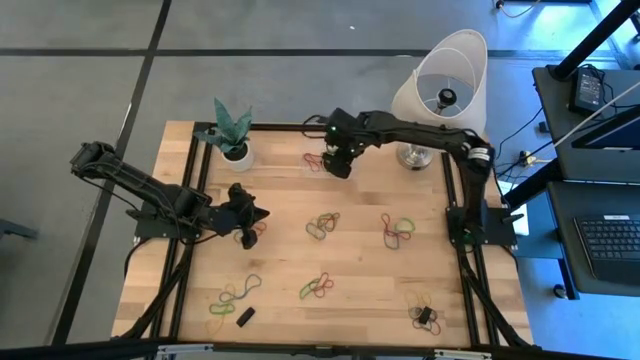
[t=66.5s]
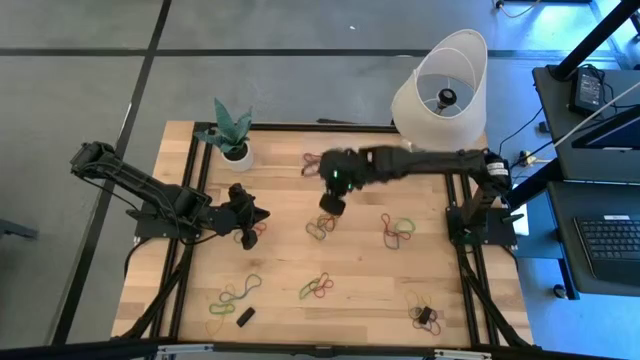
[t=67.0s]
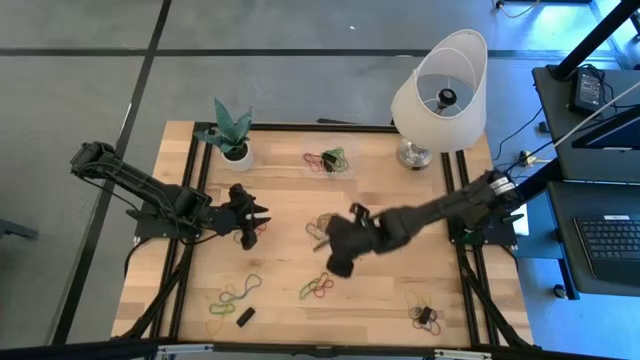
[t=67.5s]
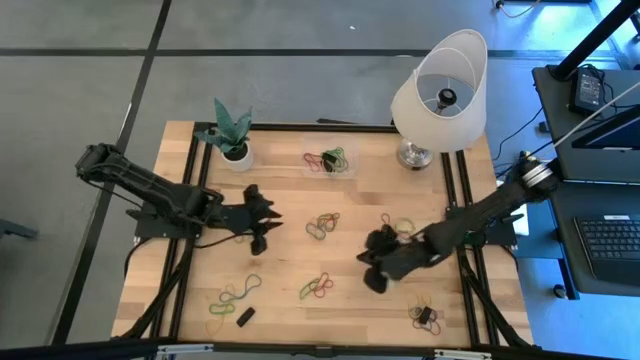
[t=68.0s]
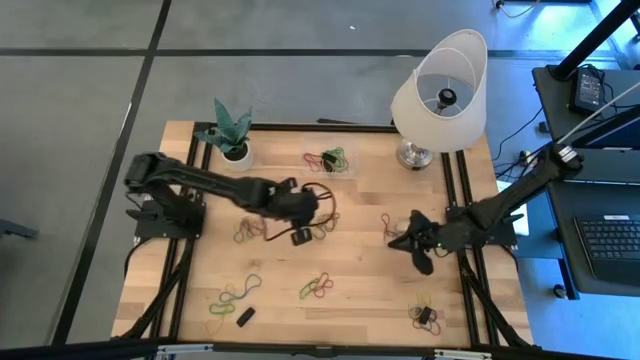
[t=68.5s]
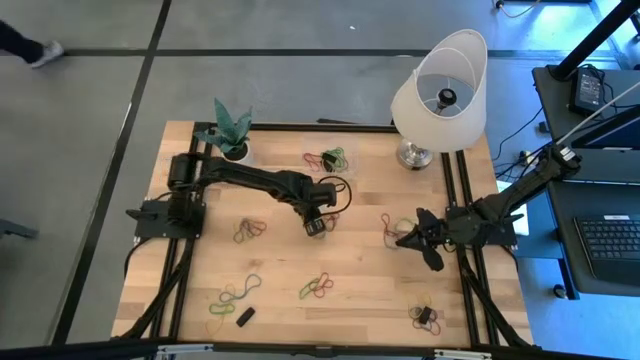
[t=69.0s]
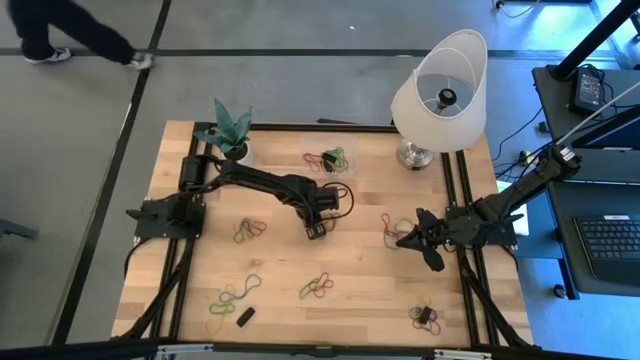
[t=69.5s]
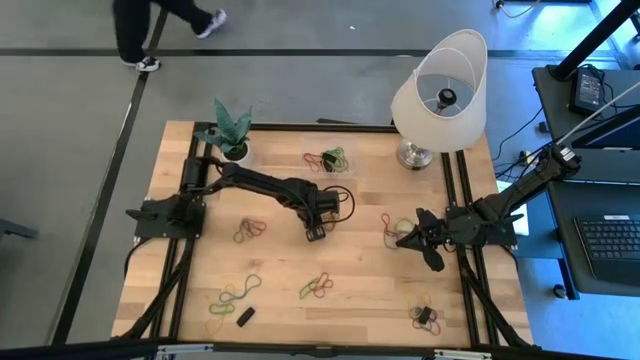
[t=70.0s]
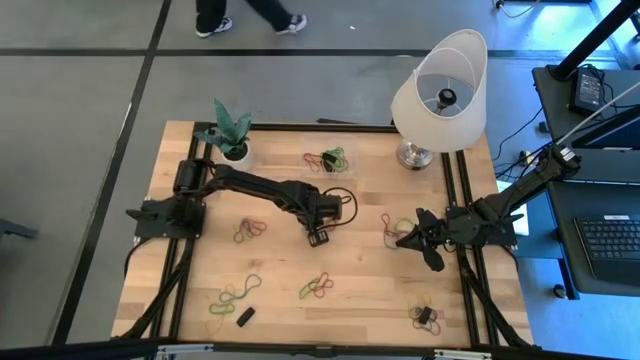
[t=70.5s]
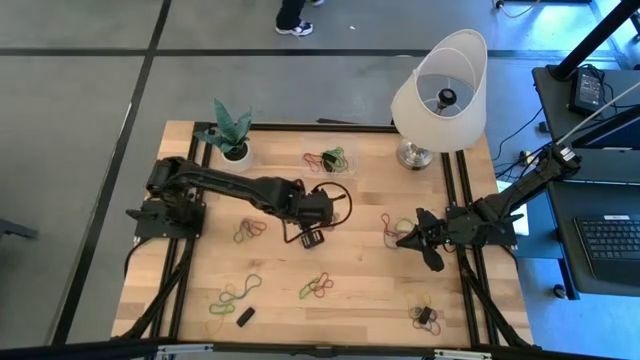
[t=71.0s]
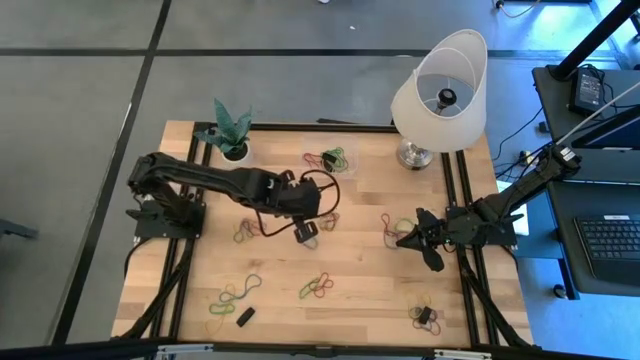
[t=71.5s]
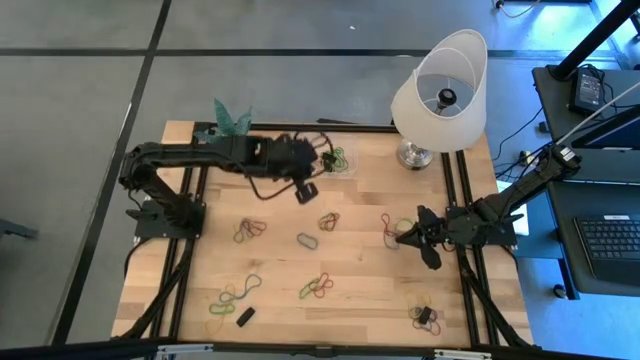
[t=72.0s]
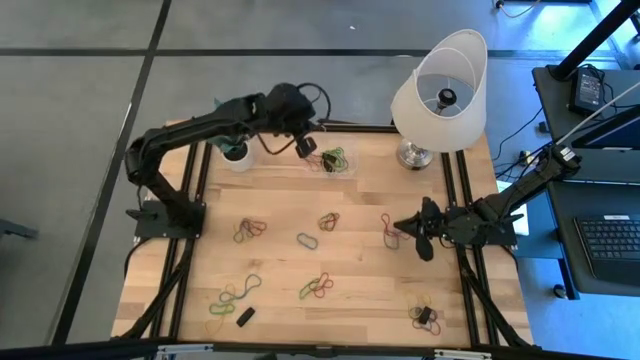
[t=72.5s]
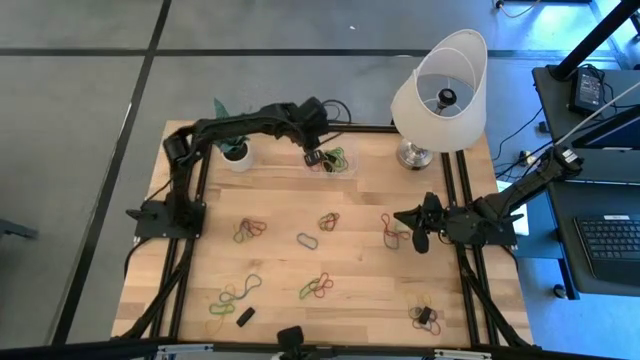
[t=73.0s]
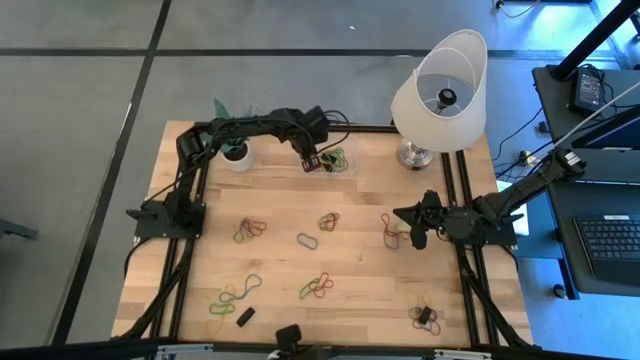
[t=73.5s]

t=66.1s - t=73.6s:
Task: Pick and place rubber bands into bin
Put the yellow rubber band into the transparent bin

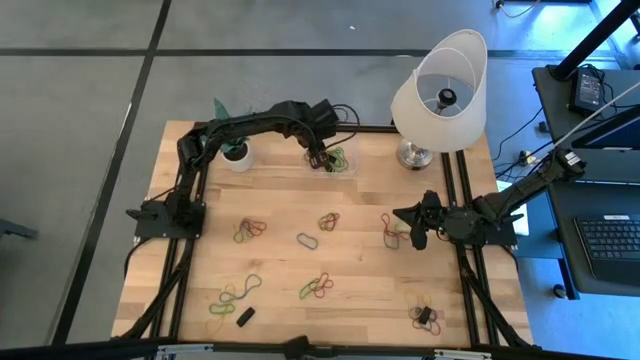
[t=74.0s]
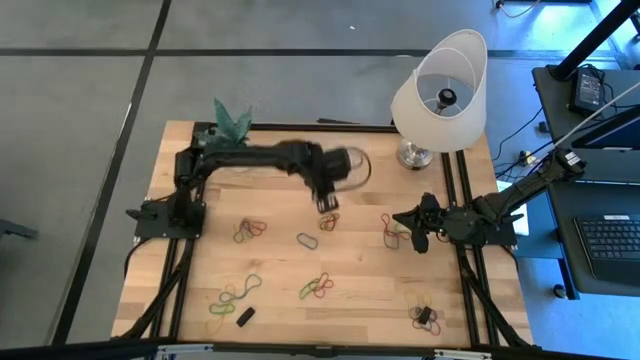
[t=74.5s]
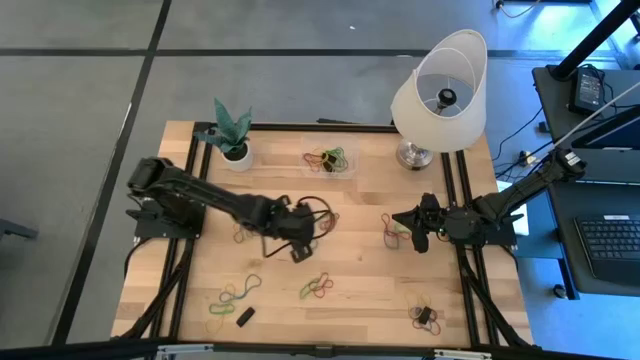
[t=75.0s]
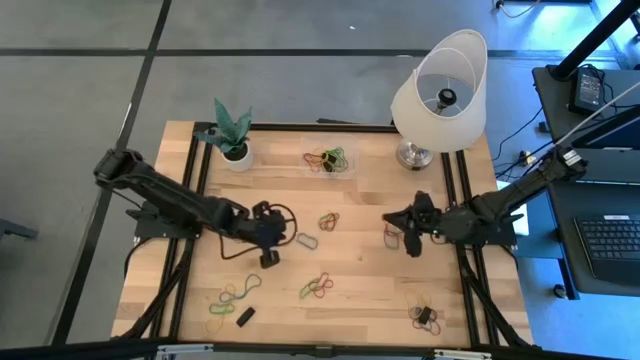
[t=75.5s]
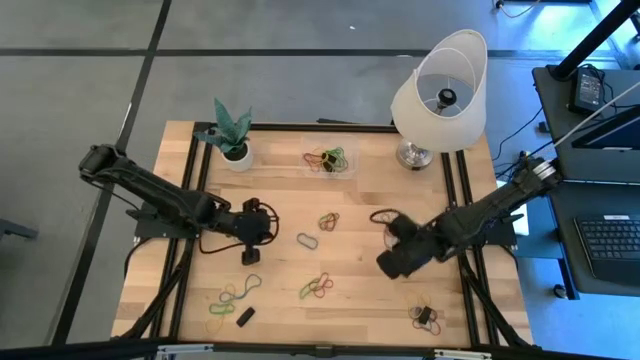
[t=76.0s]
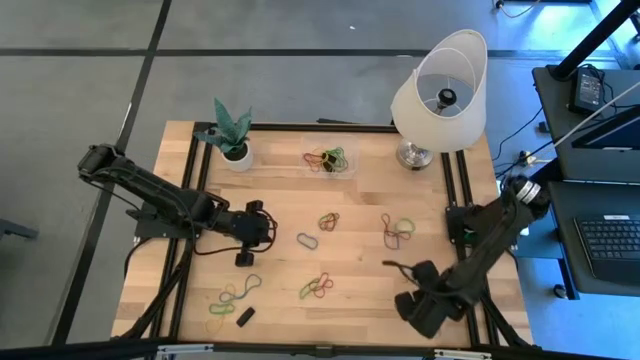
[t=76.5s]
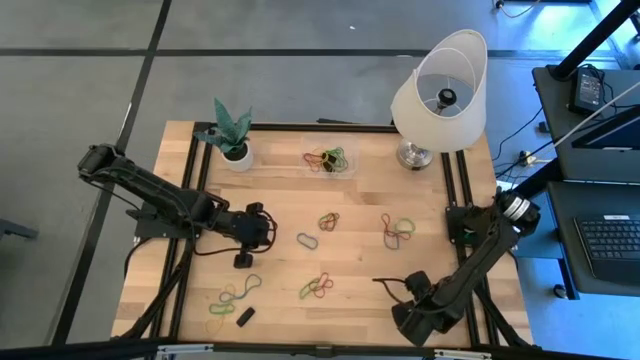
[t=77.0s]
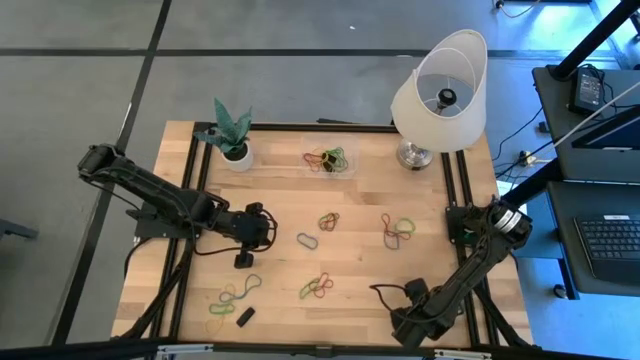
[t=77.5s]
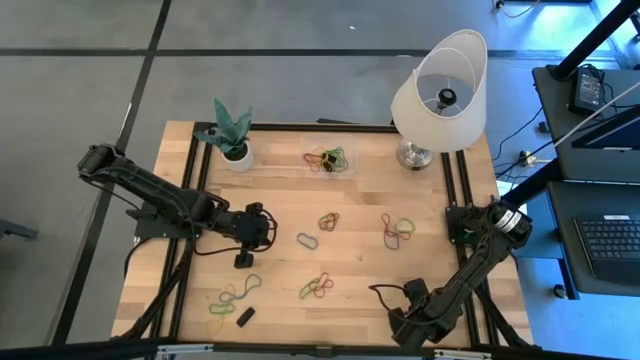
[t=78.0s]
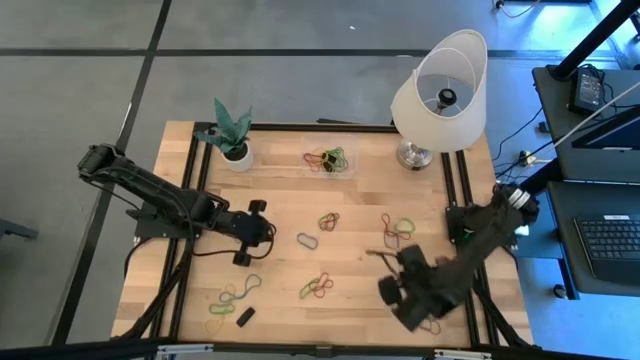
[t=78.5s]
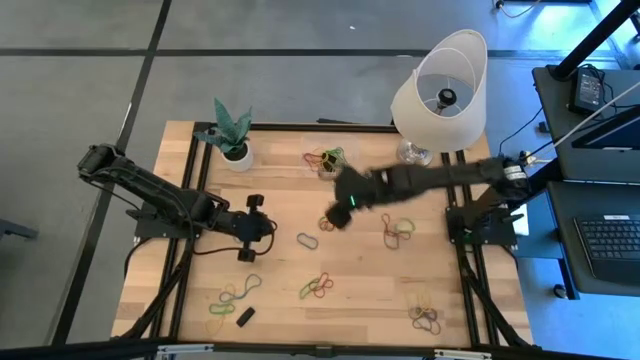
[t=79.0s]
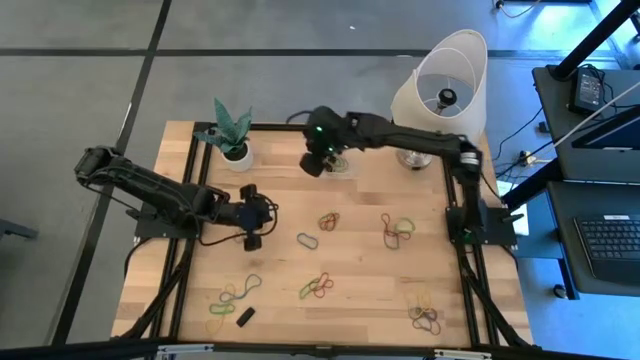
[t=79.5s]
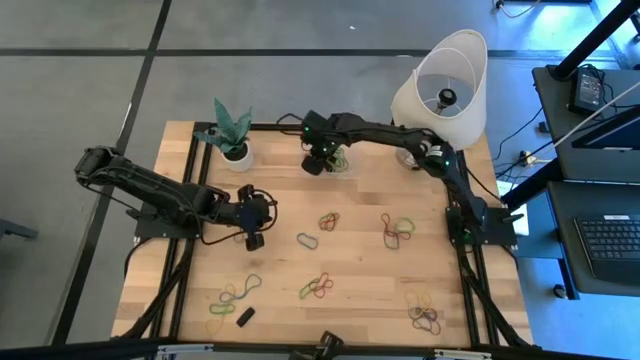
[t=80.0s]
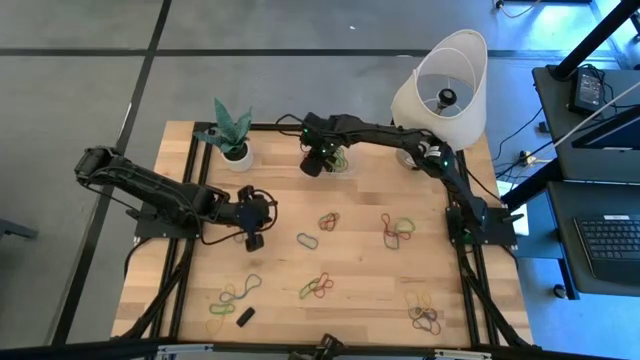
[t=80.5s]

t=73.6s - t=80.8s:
Put the black rubber band into the transparent bin

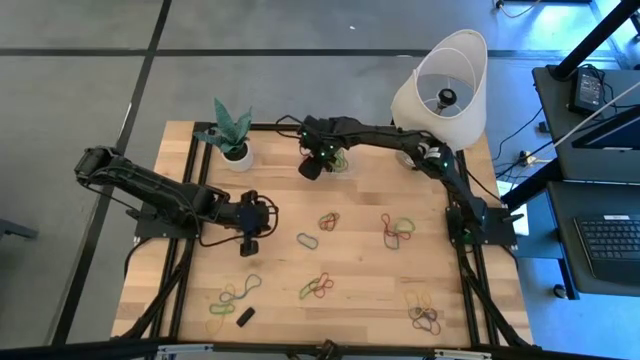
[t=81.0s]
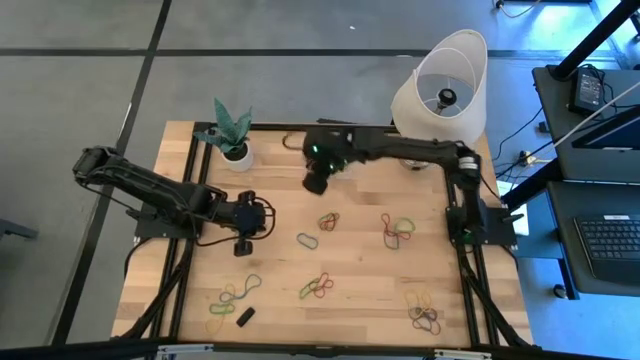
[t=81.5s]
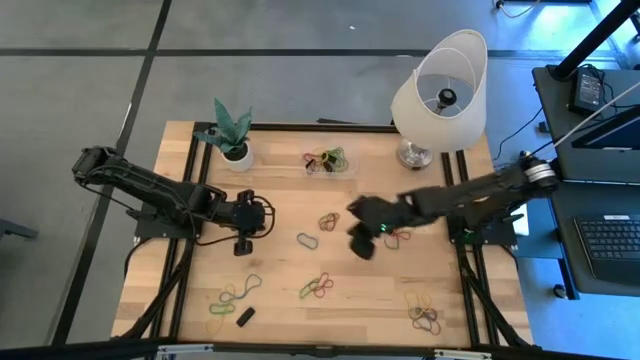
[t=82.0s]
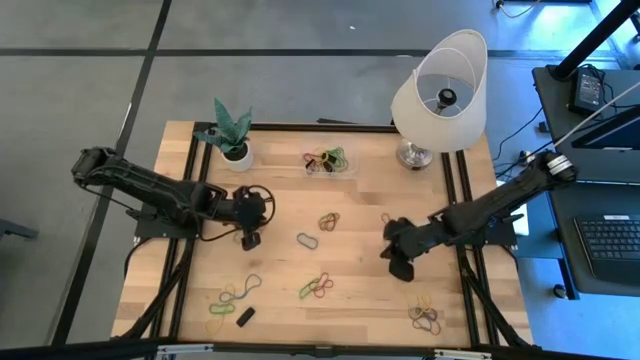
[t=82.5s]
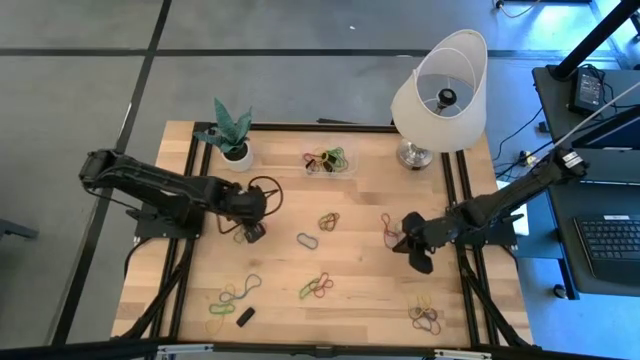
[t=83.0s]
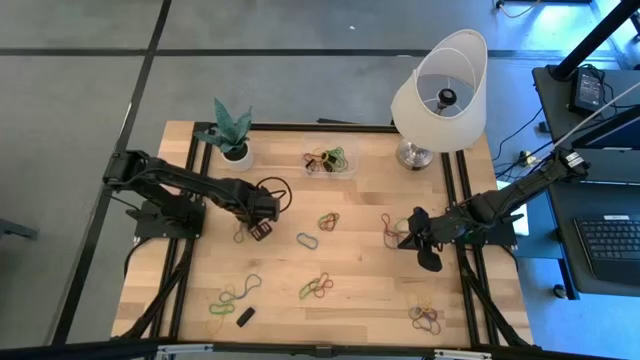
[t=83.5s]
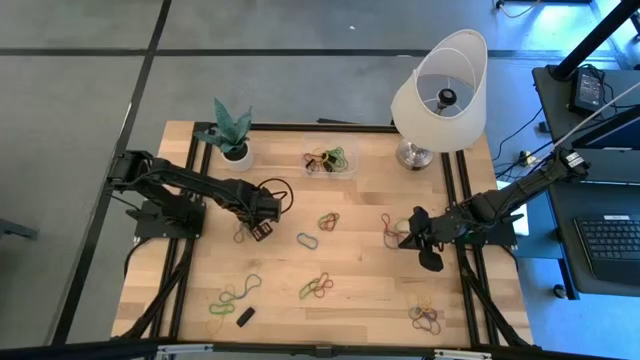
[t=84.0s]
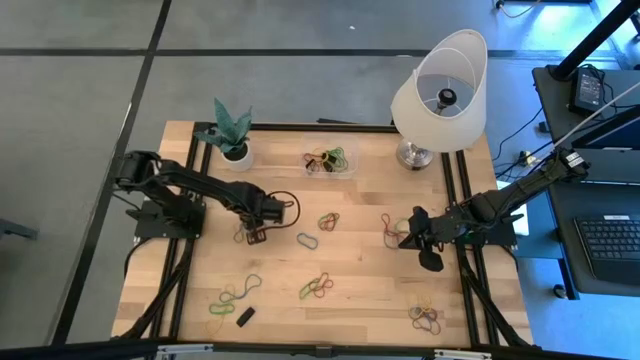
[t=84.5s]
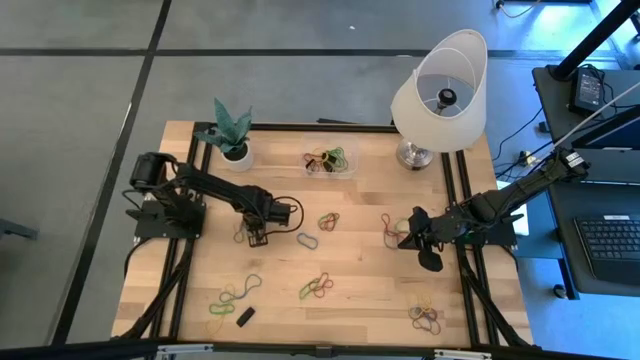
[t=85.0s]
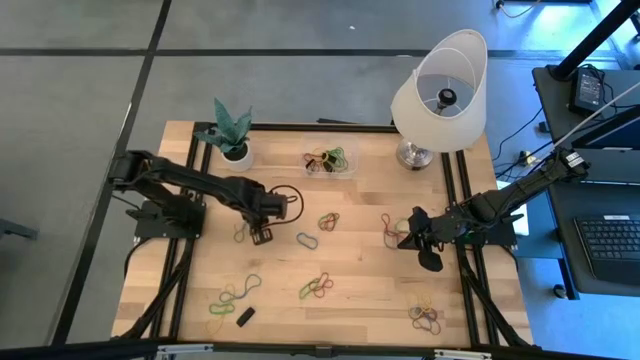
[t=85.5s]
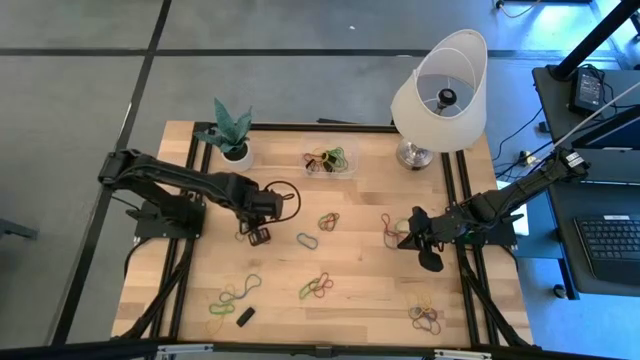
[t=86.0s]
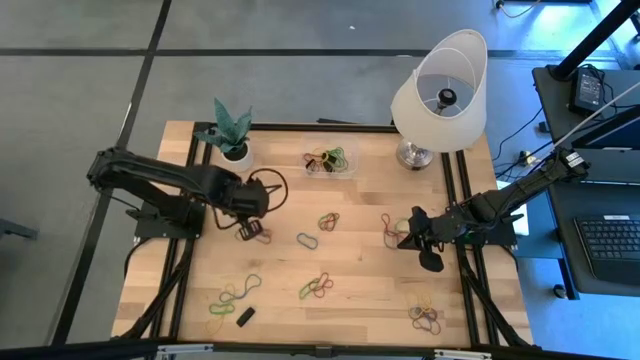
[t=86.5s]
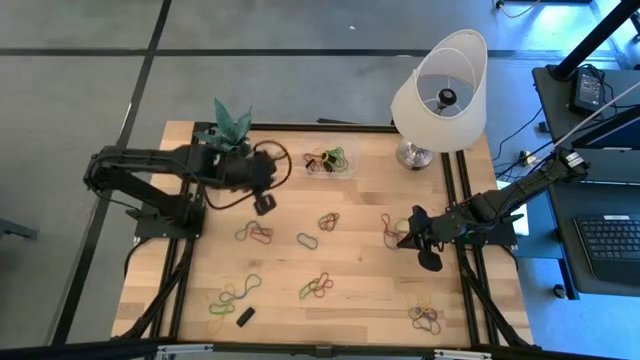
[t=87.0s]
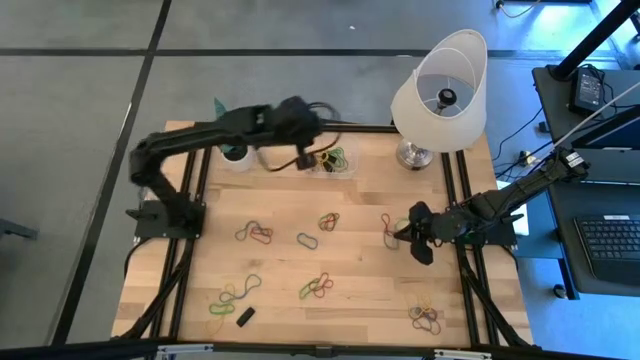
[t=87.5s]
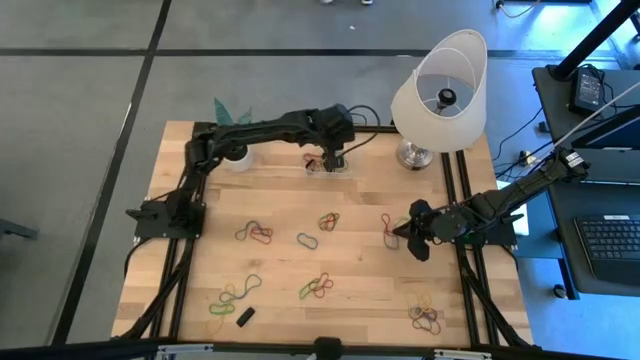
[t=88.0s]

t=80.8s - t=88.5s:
Put the yellow rubber band into the transparent bin
